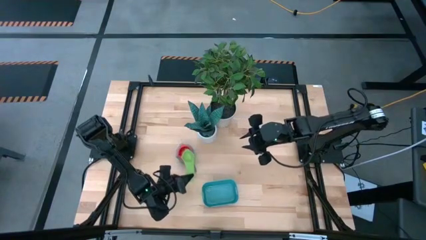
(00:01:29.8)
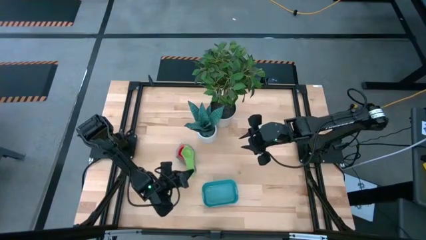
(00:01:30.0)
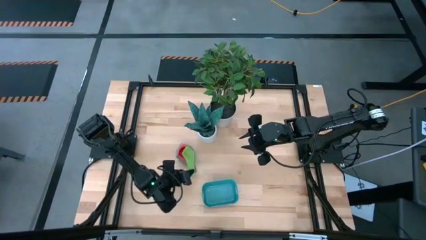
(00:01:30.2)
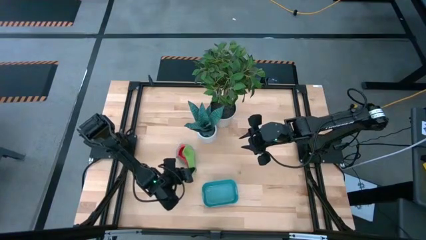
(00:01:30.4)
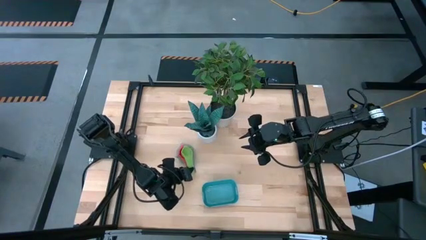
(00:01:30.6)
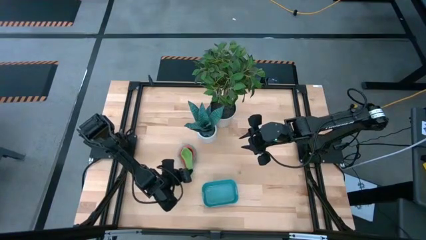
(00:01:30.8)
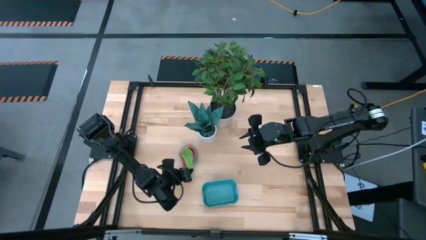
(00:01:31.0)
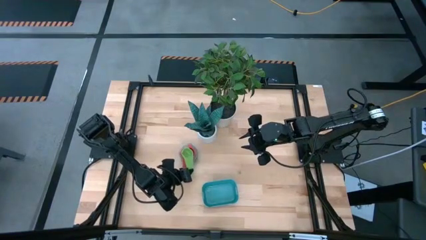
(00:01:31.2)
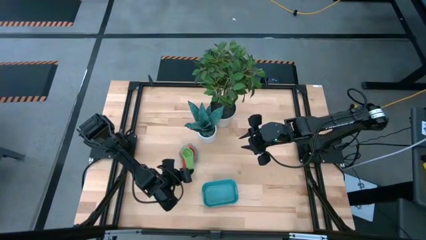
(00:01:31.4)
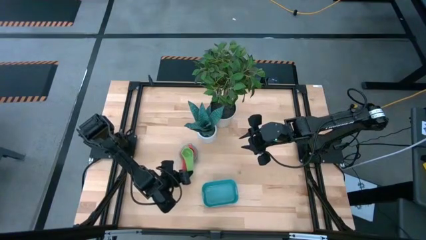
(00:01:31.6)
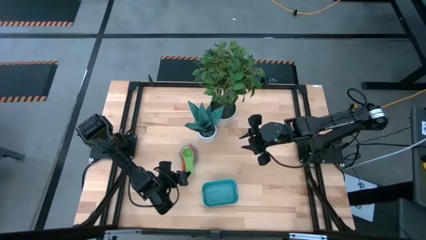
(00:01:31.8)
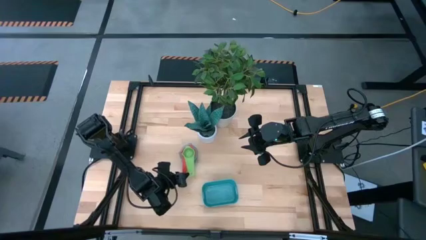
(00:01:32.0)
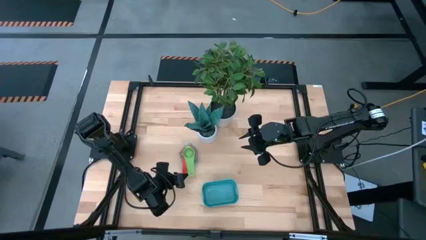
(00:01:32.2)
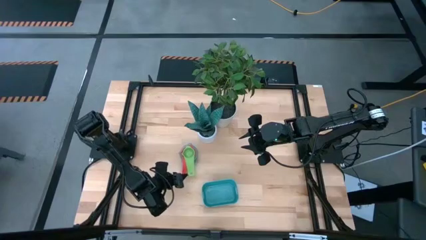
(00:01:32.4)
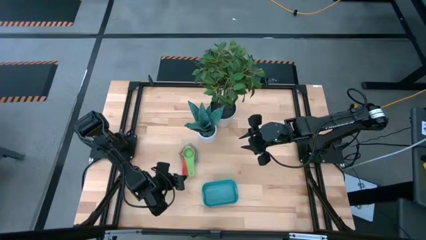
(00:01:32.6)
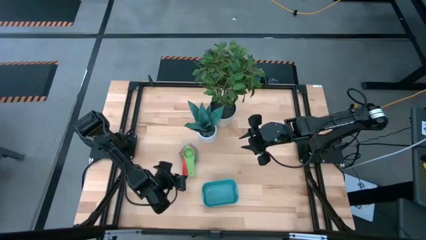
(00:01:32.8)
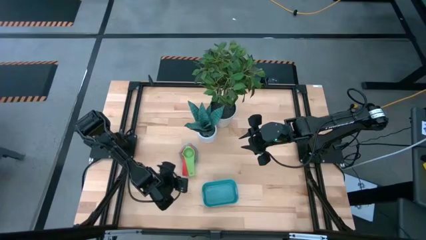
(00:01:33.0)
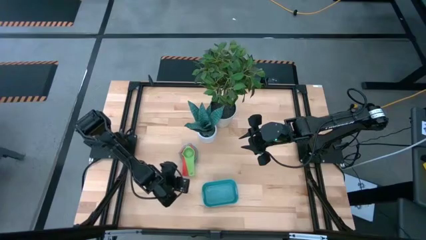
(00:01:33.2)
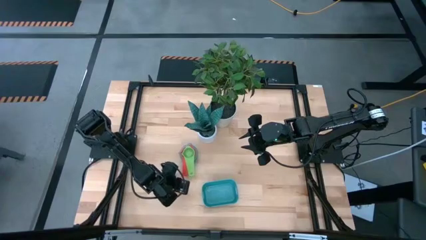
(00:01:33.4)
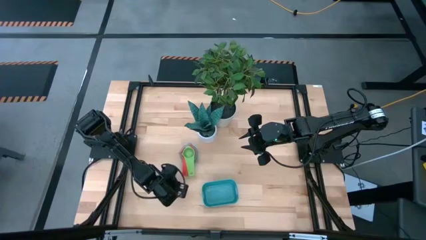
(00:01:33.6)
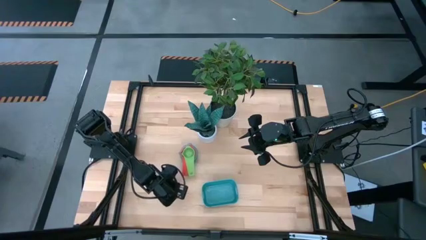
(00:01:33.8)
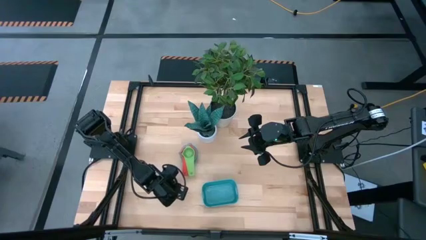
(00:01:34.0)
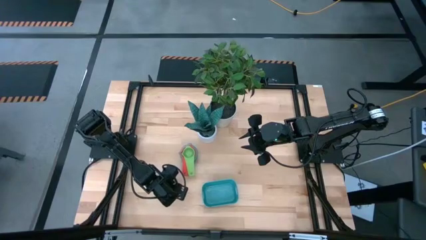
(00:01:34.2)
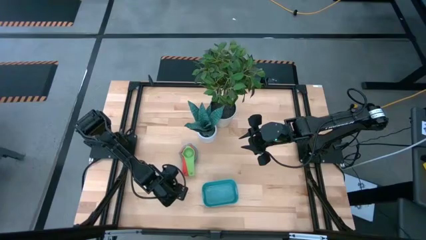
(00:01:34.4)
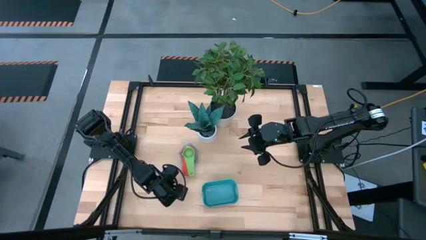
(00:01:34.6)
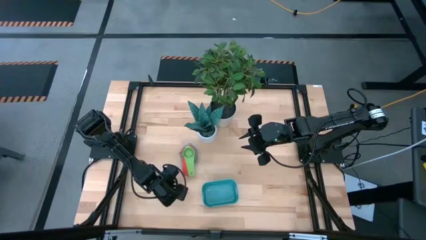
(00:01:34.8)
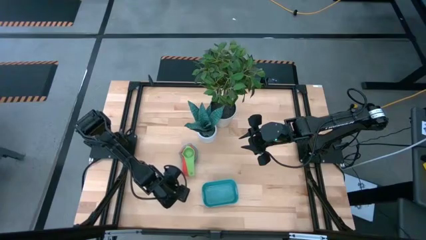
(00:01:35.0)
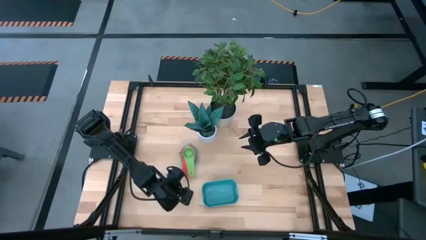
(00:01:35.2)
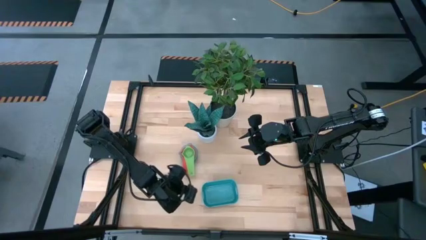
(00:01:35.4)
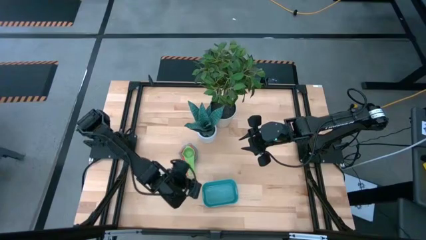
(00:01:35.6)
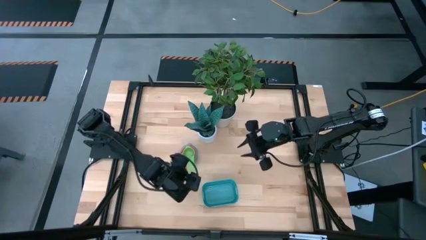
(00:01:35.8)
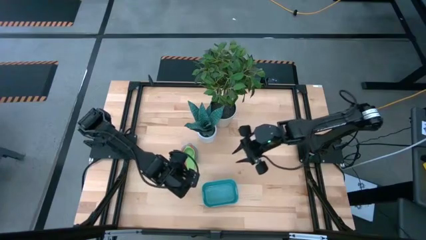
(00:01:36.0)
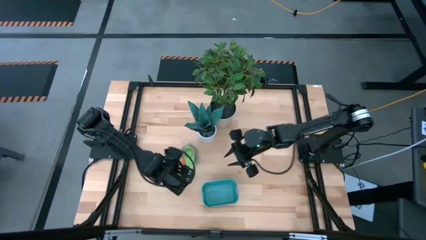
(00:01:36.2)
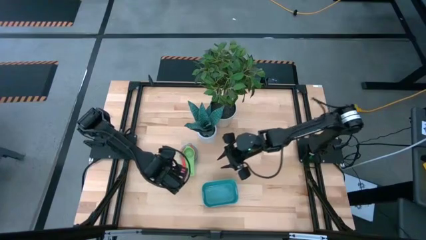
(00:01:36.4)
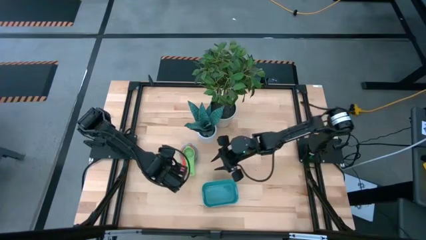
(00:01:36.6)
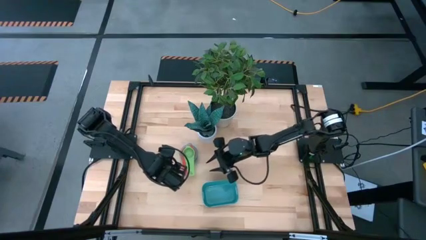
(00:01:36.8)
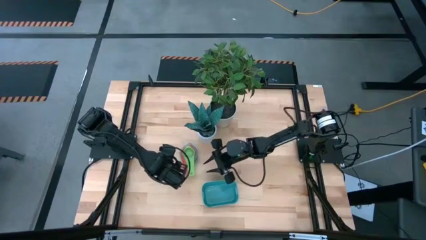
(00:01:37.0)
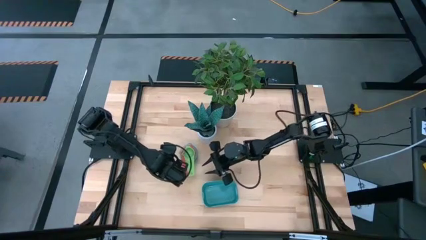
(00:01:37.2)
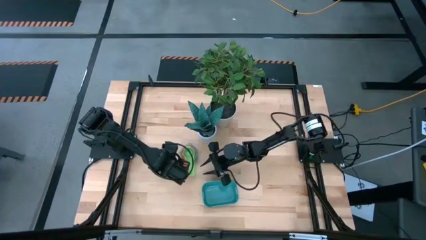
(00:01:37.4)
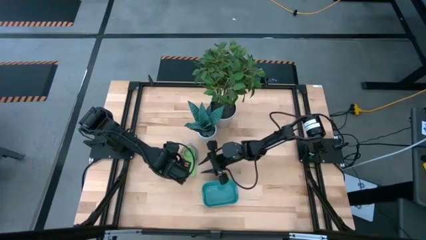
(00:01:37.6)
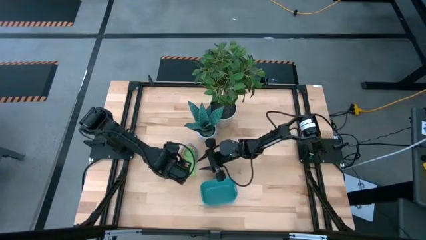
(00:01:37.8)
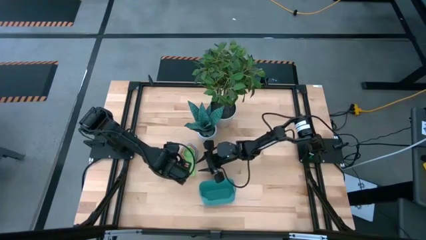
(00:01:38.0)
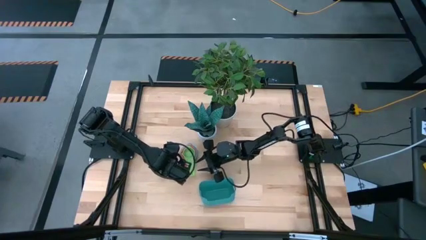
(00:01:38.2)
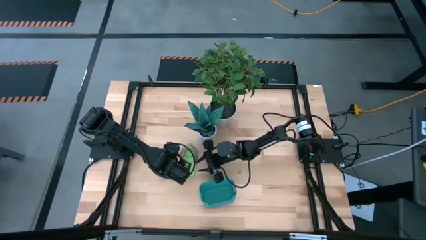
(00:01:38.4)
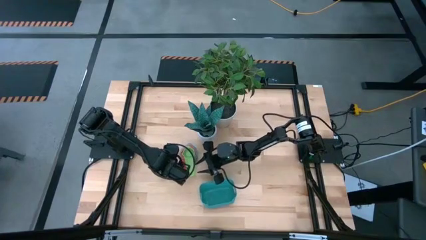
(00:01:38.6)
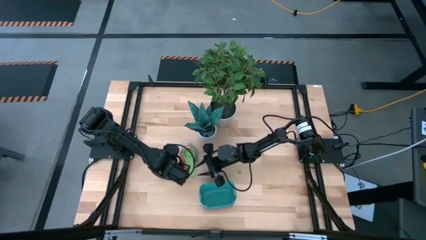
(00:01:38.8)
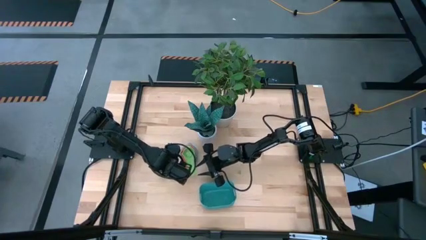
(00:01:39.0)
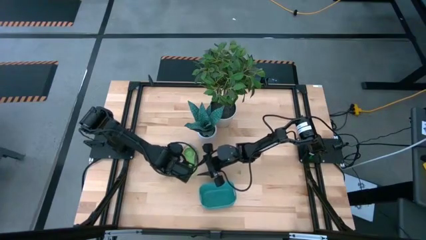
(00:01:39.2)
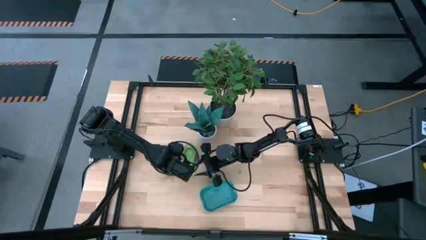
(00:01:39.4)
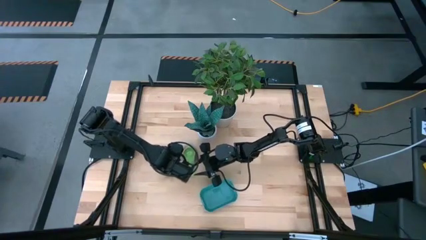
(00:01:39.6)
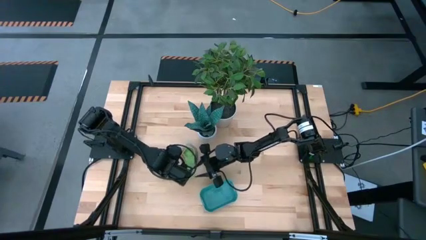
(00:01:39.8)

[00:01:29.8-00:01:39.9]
Task: Nest measuring cups in basket
Stack the green measuring cup on top of the red measuring cup
